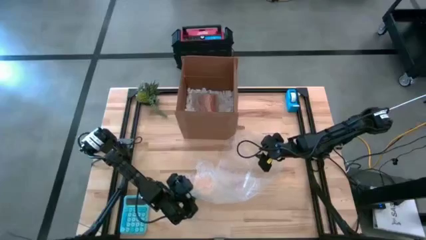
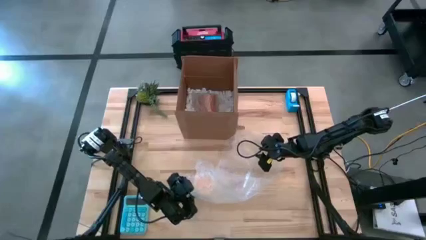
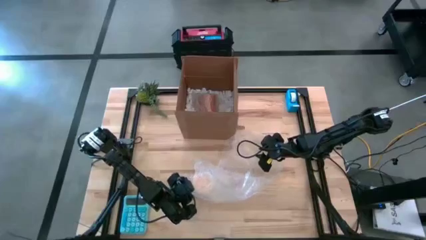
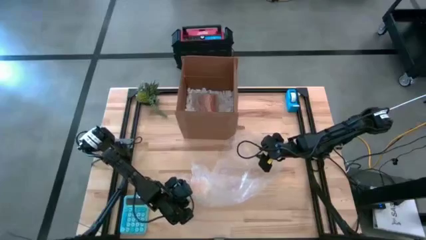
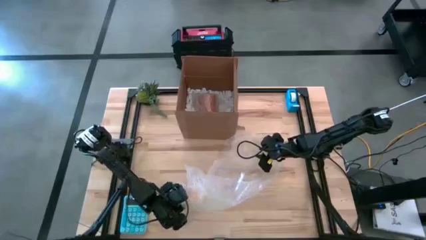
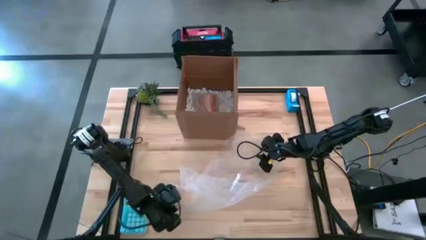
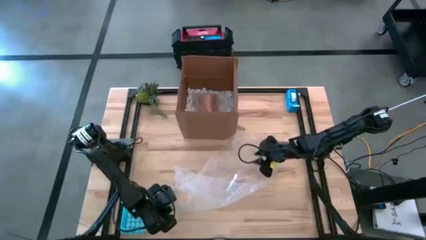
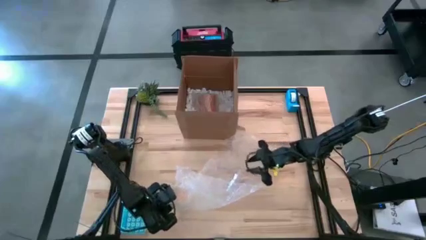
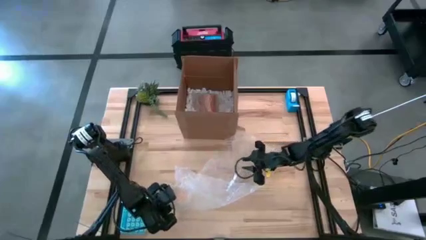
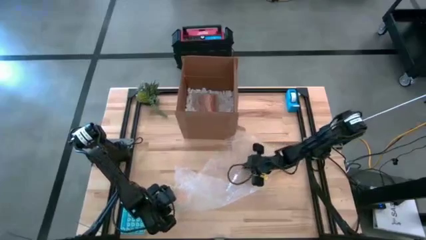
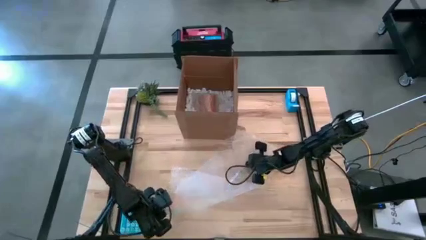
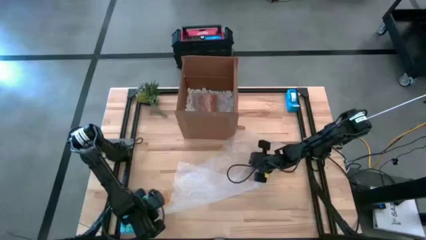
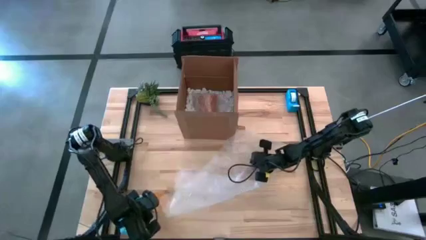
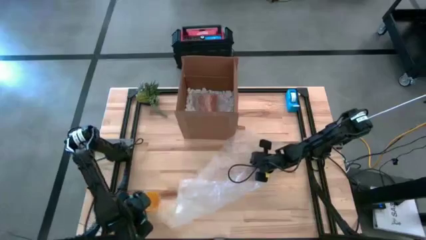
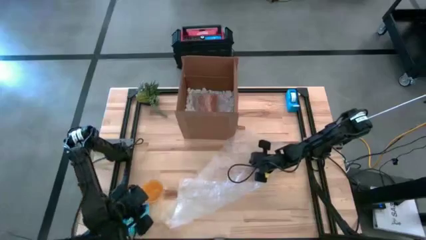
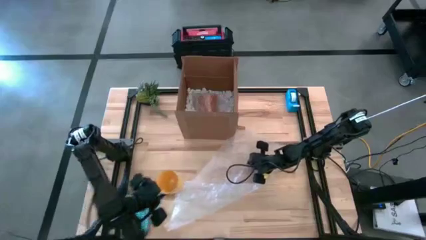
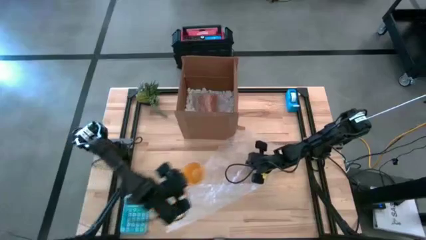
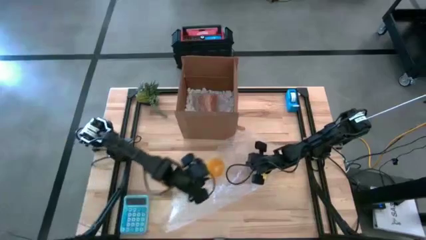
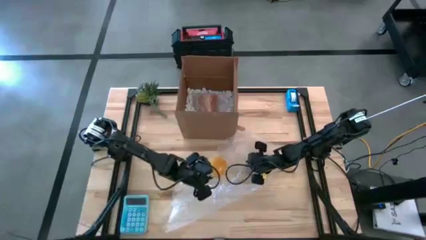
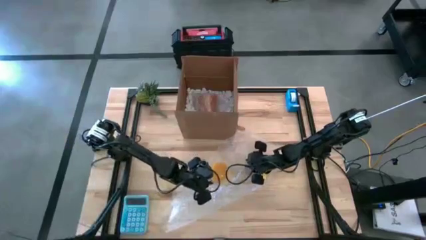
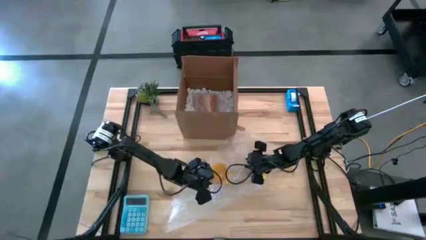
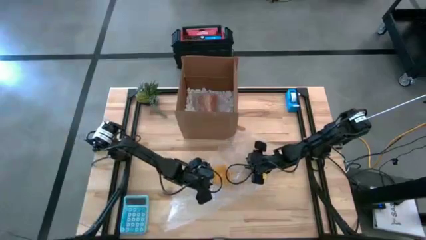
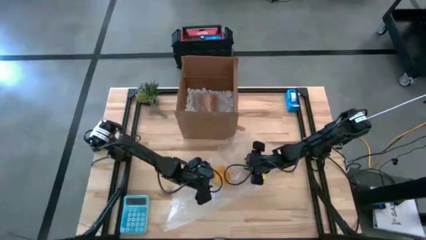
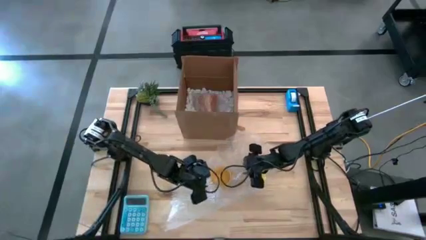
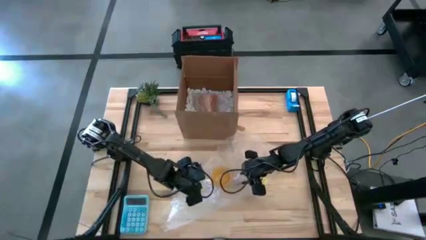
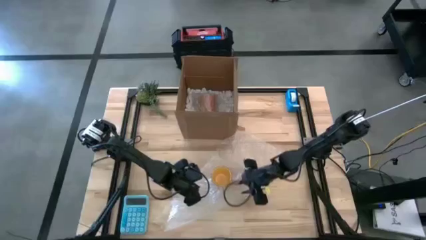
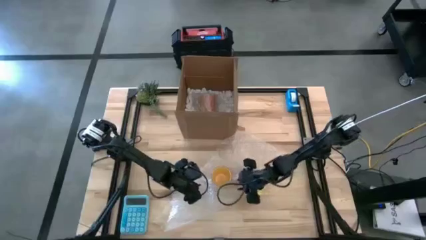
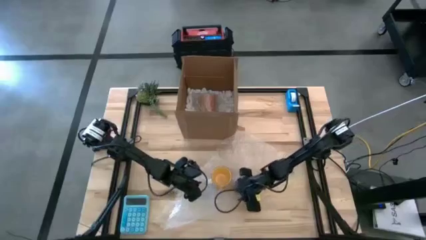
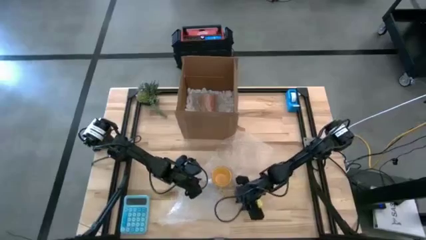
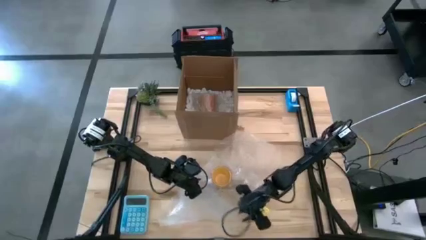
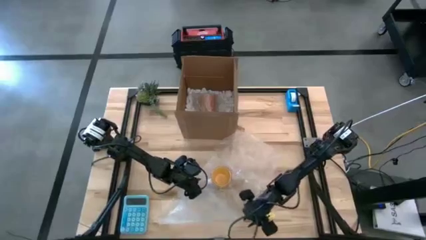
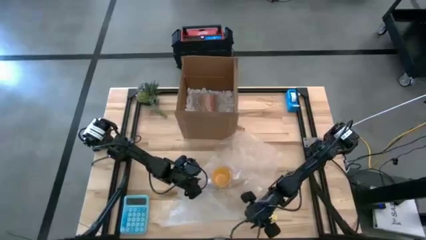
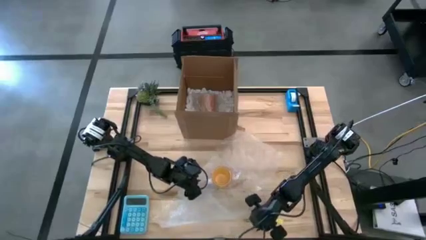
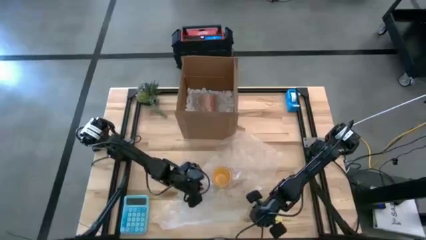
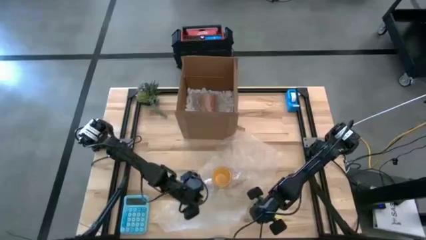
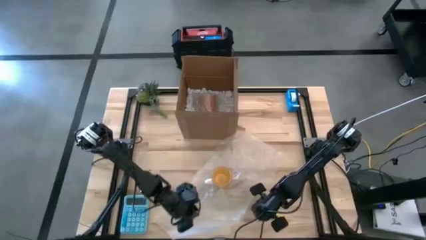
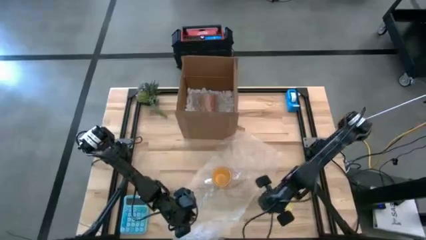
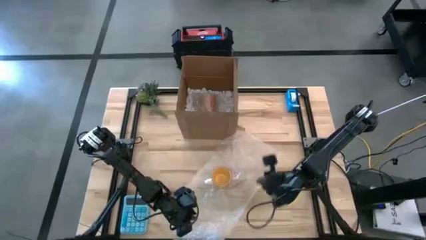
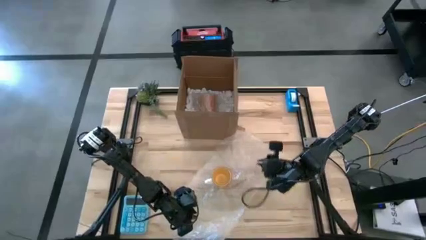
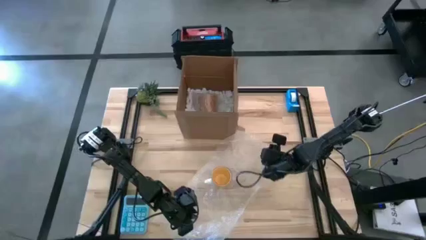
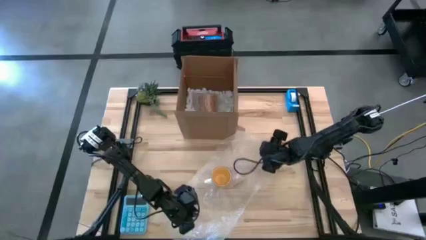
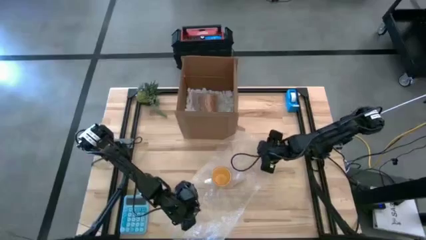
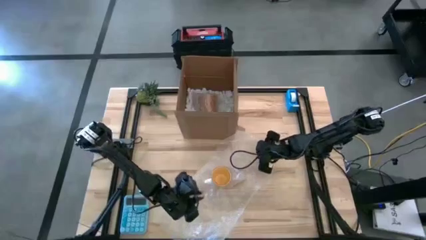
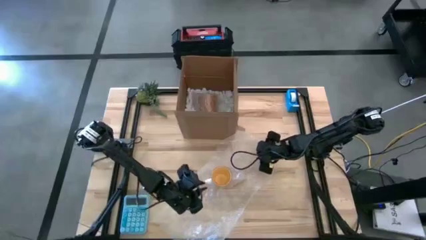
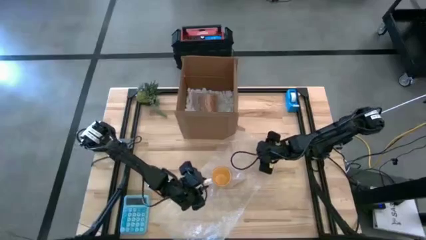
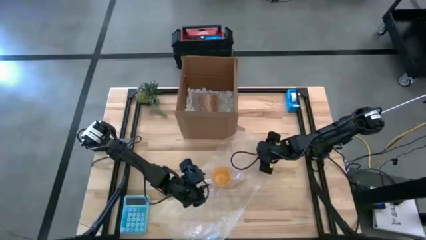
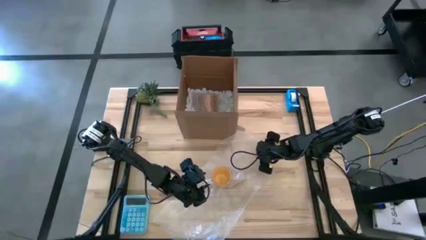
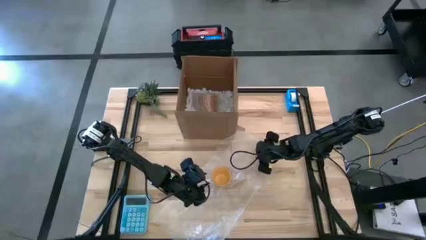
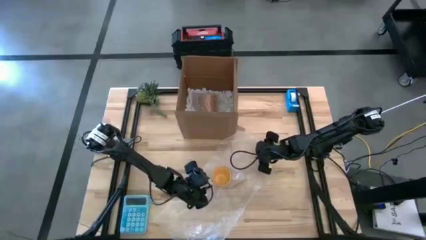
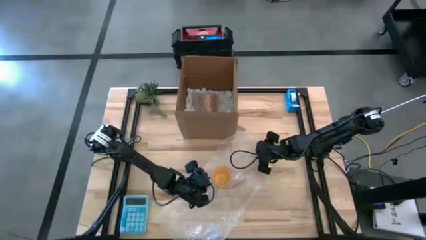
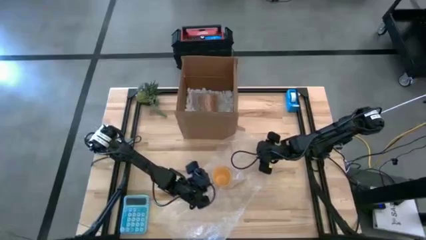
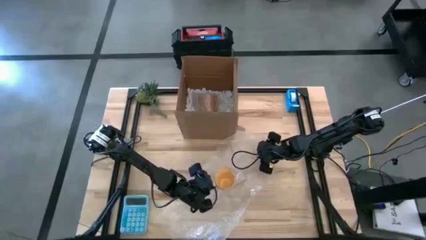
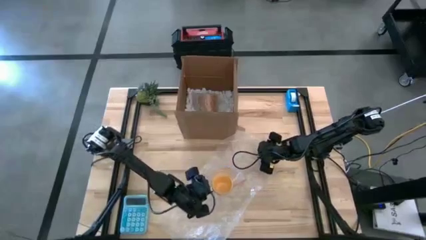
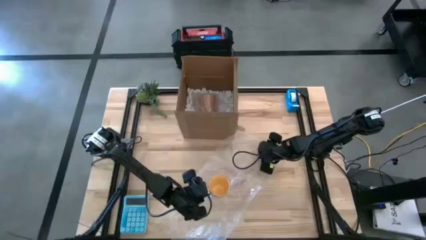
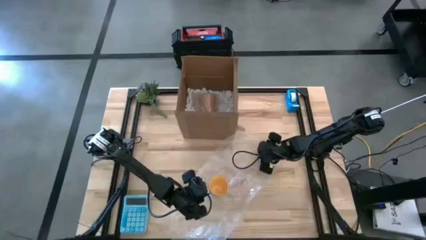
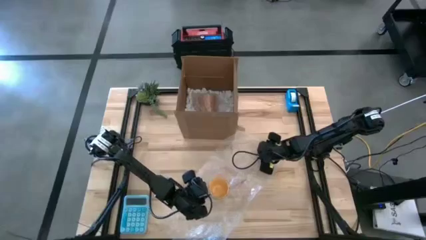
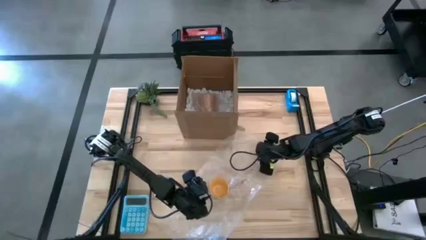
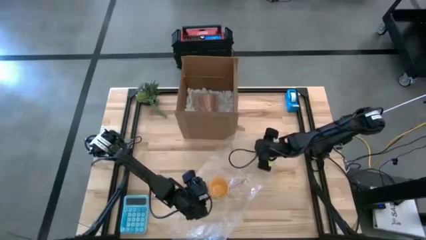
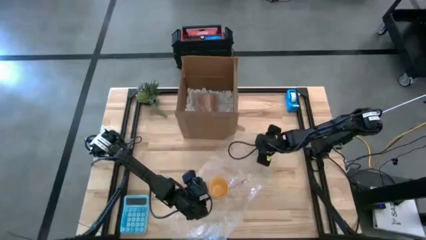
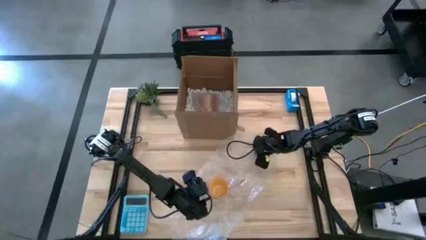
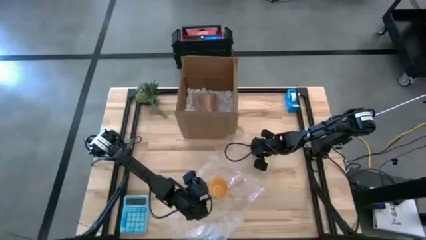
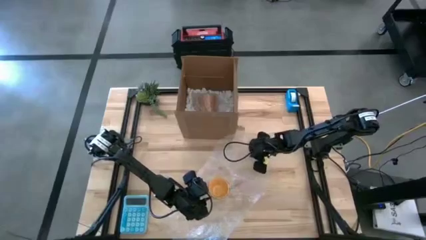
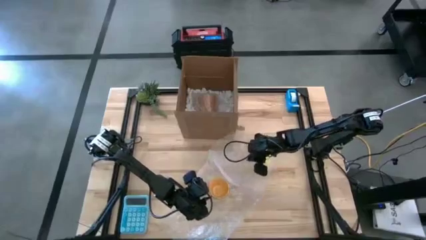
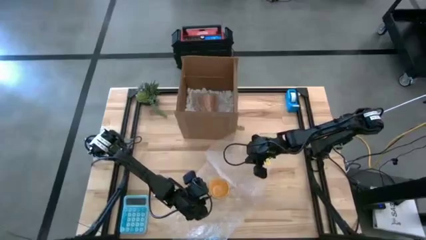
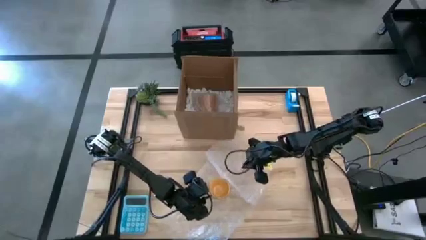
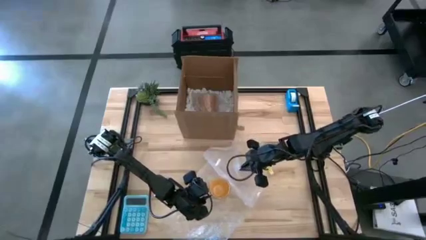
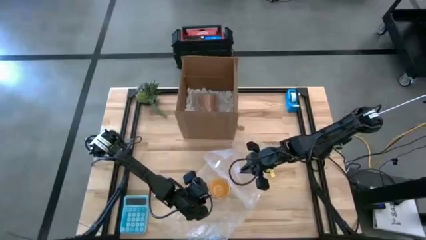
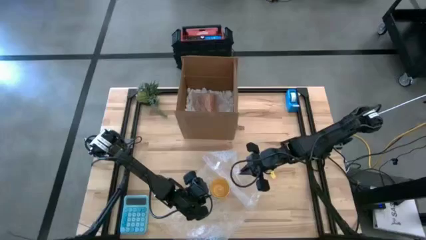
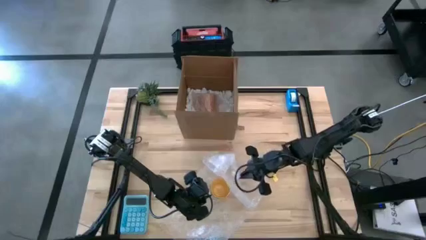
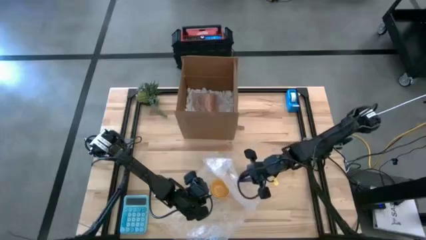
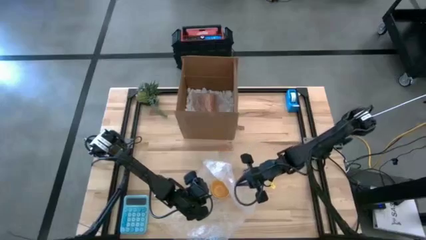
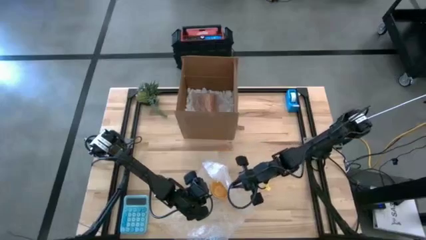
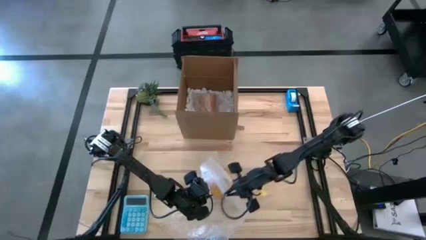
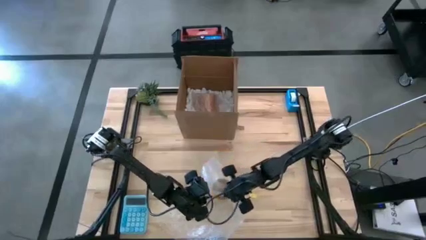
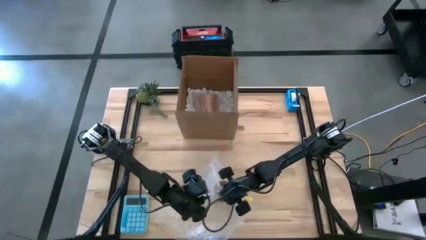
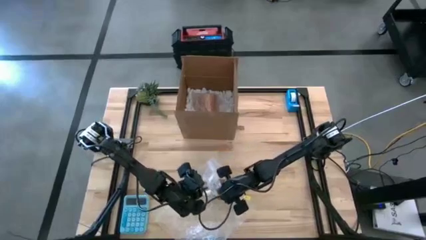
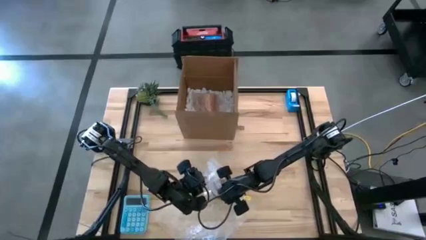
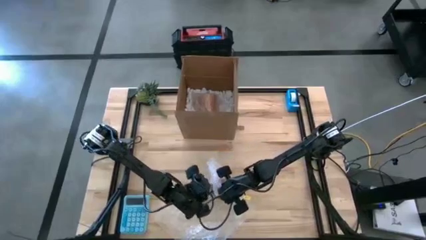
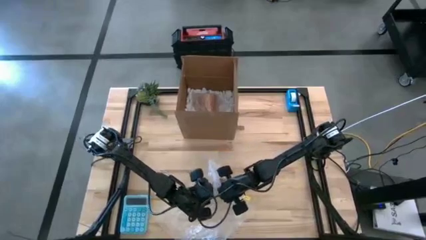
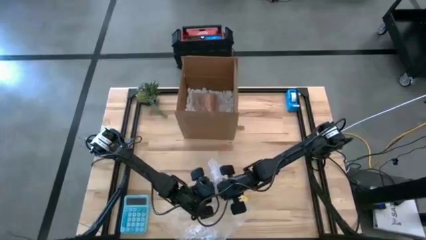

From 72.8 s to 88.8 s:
Task: wrap mug
Wrap the yellow mug with bubble wrap
